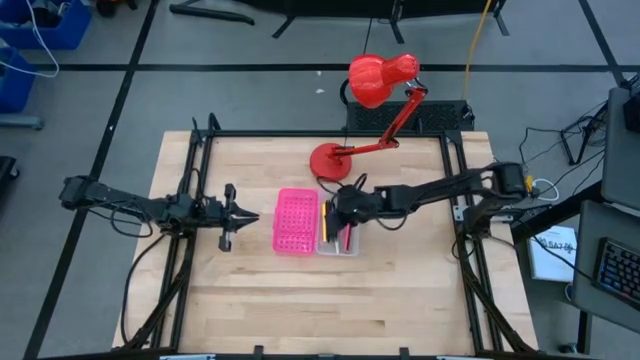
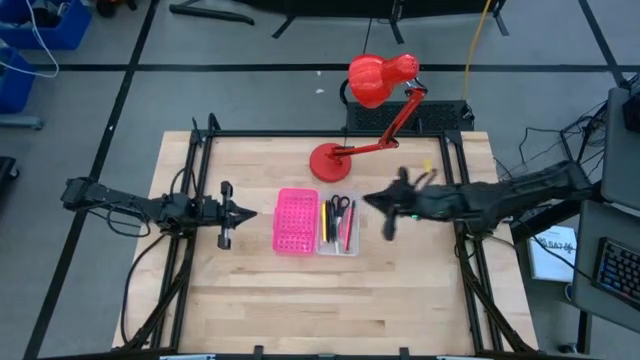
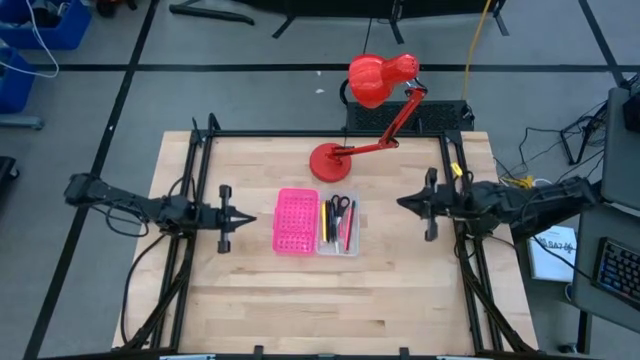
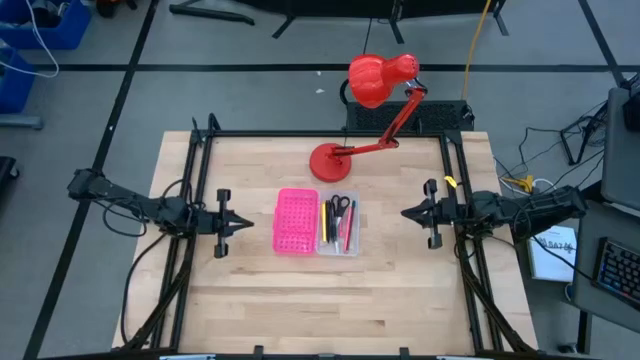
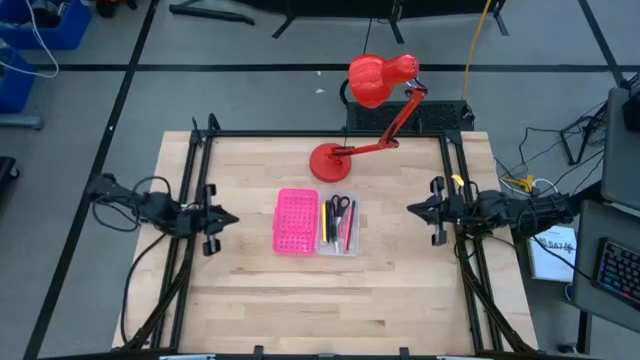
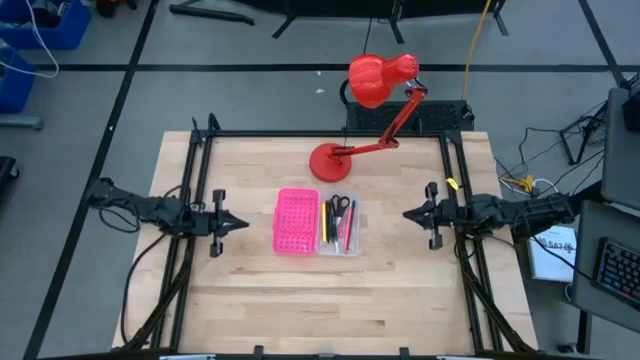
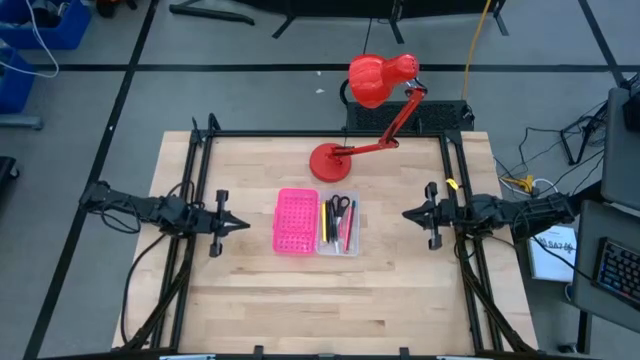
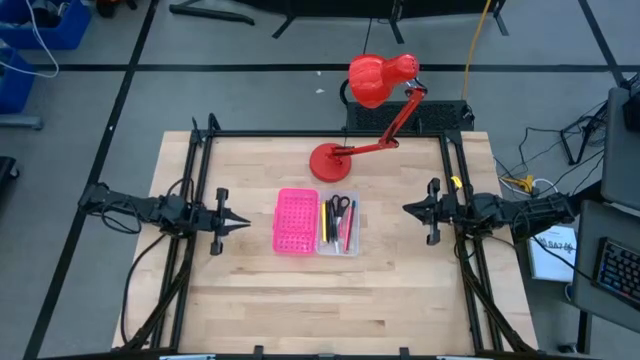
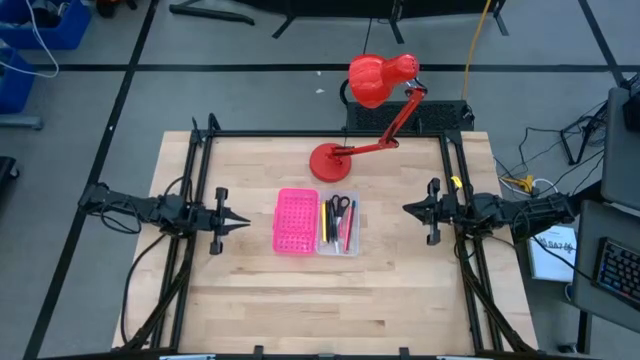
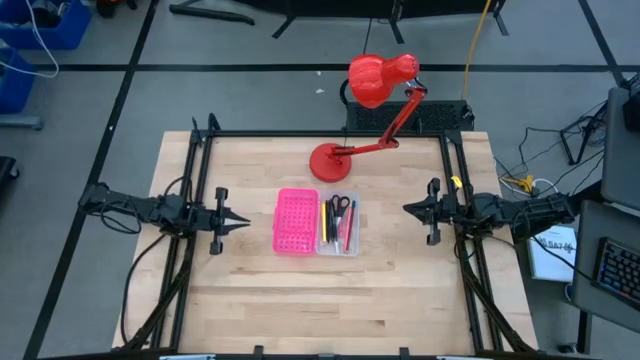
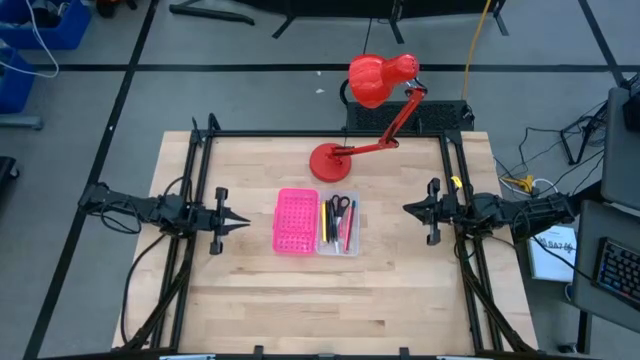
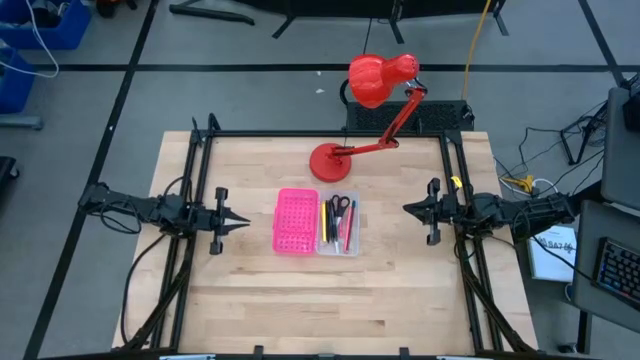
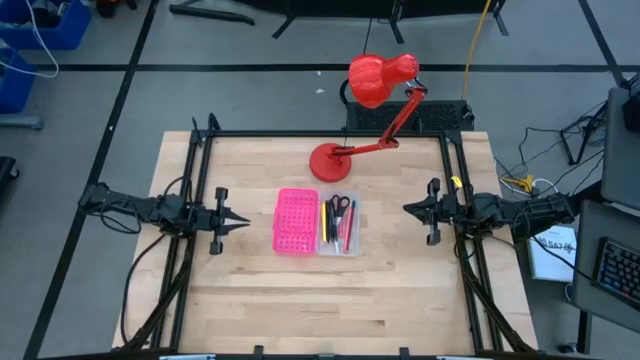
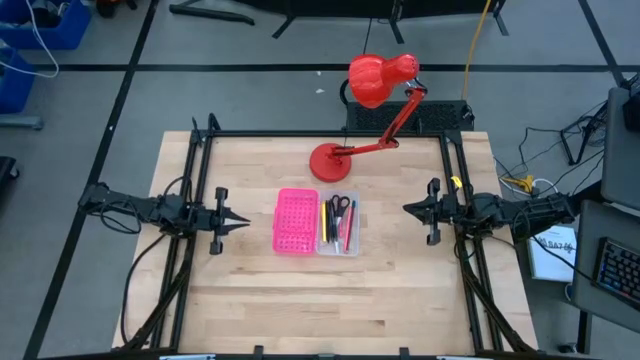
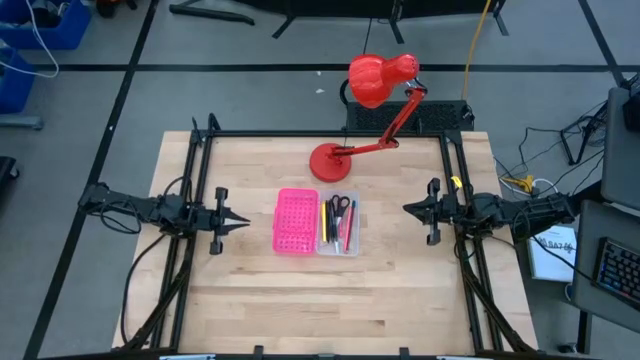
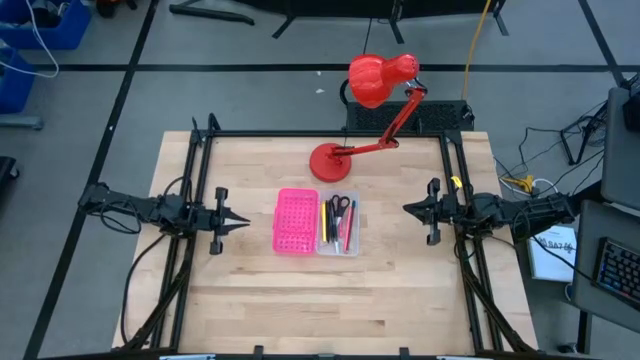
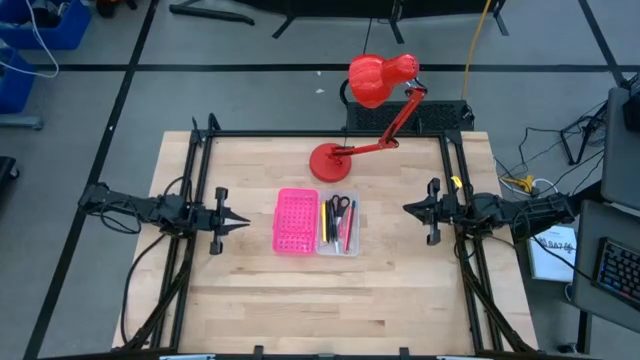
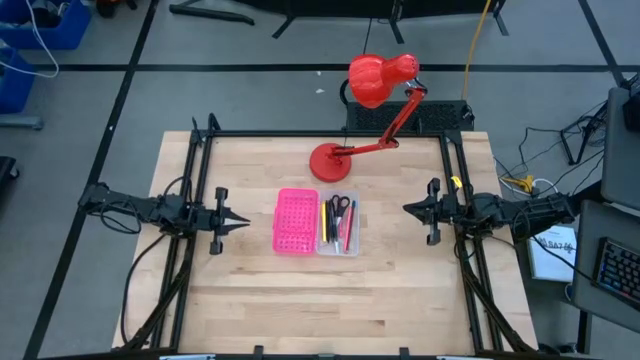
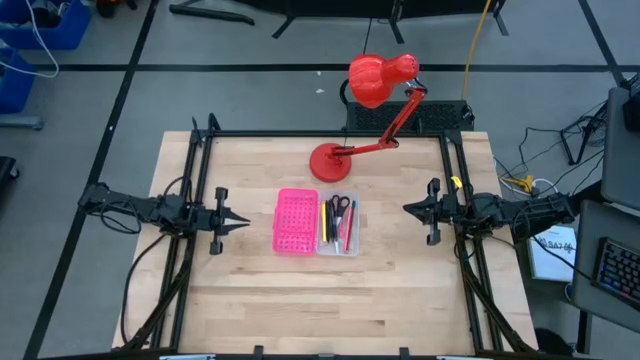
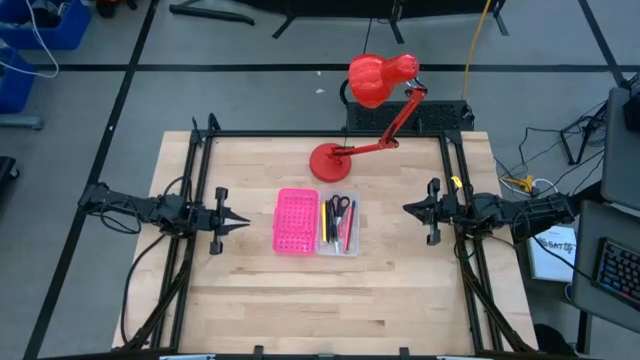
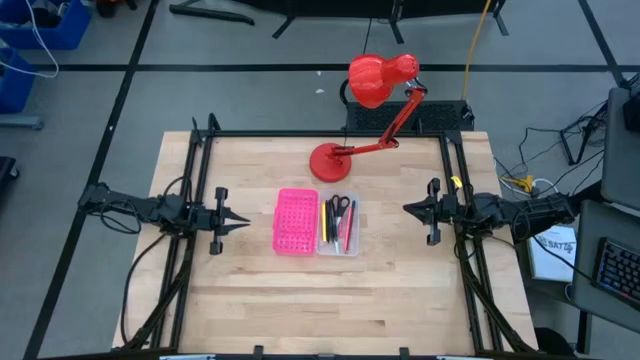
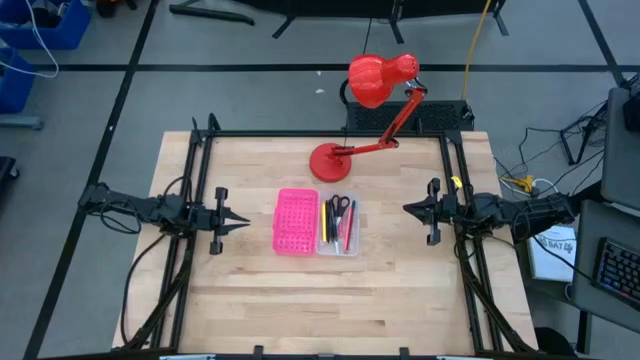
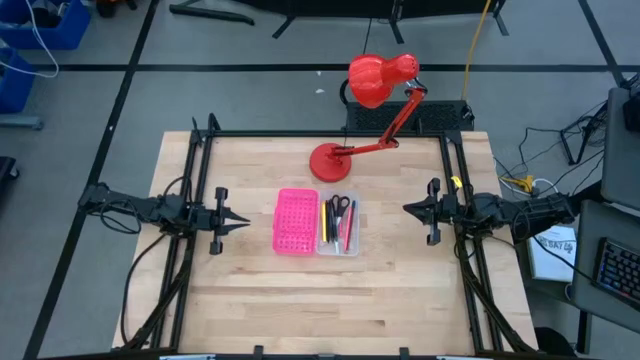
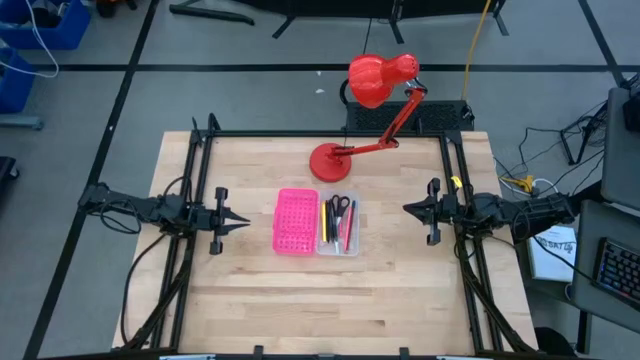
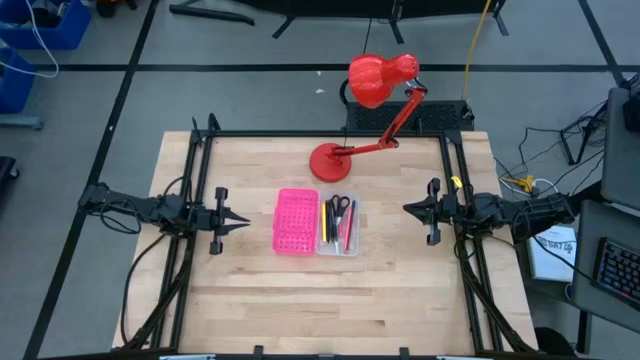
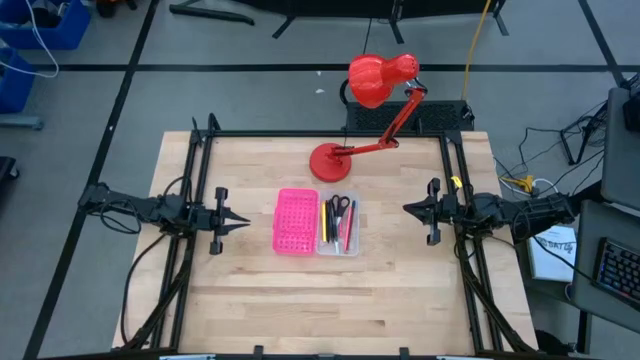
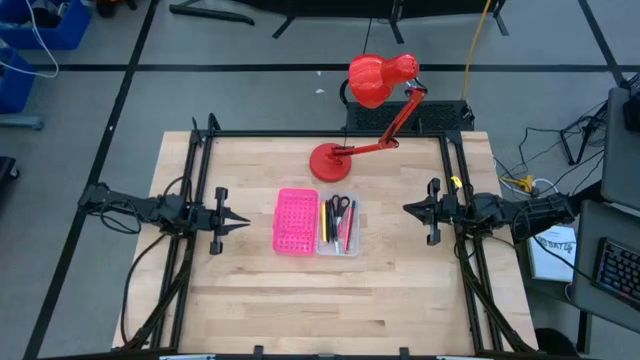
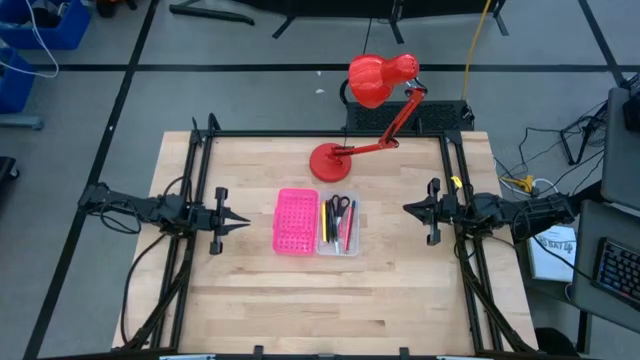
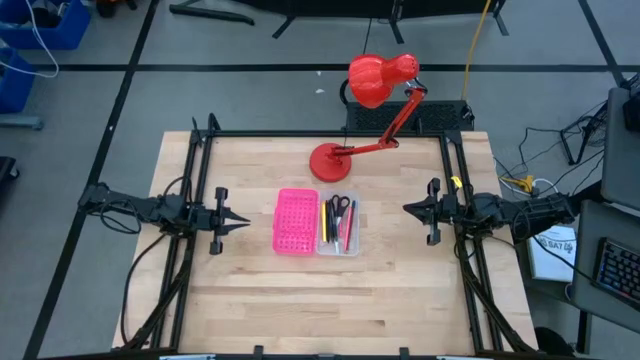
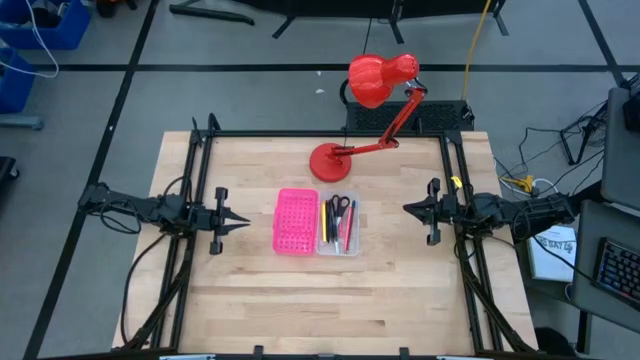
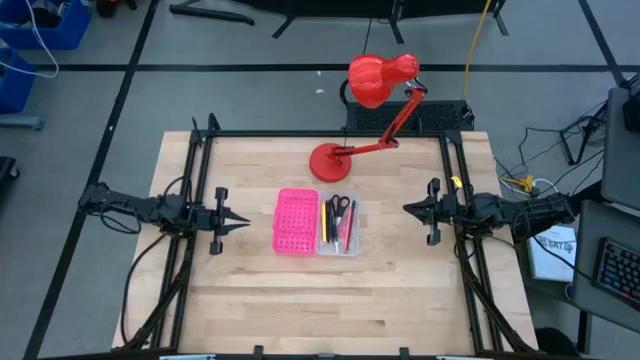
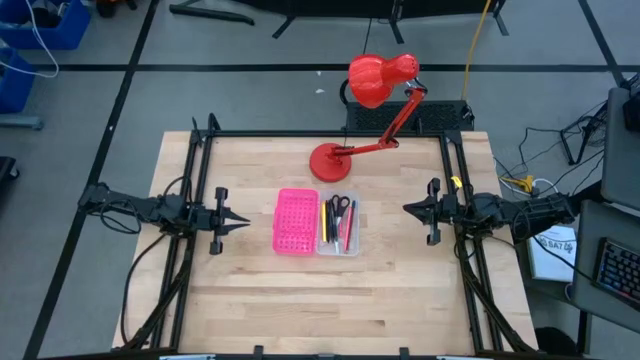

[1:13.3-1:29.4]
Task: Pick & place school supplies into a supply box
Return to Home Position

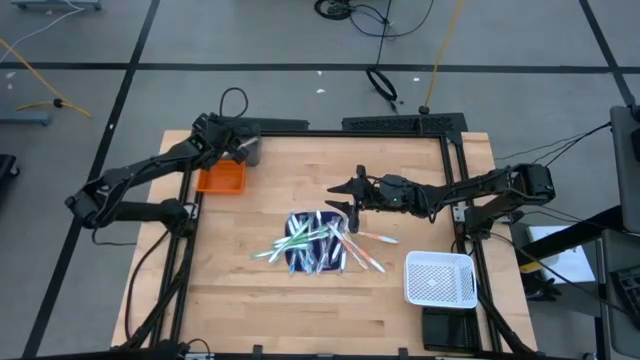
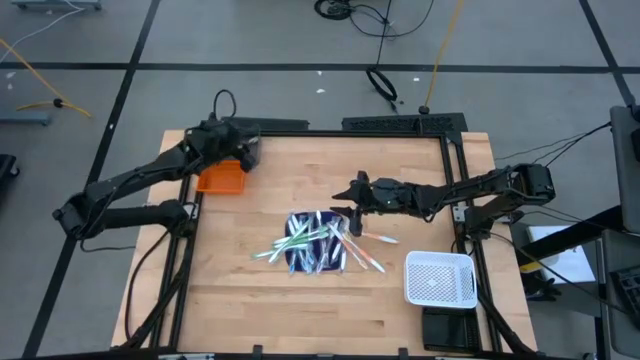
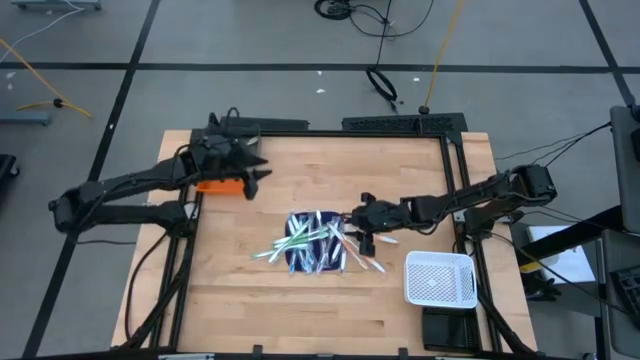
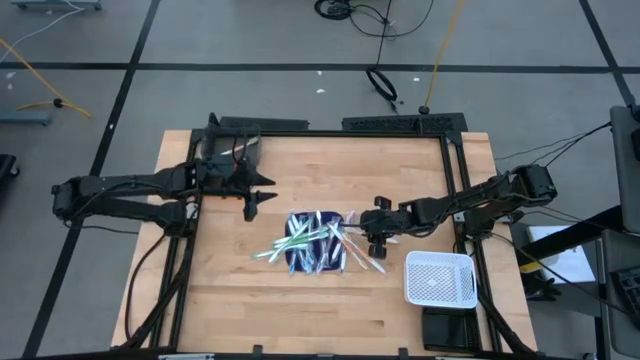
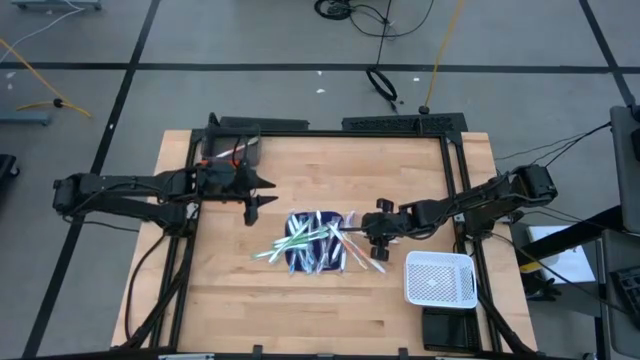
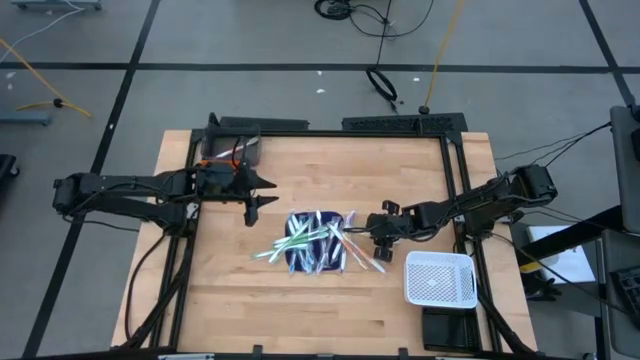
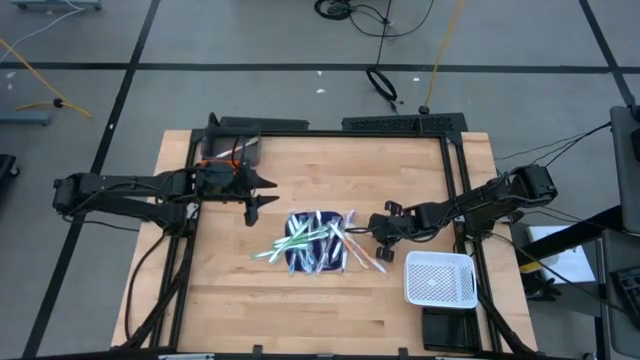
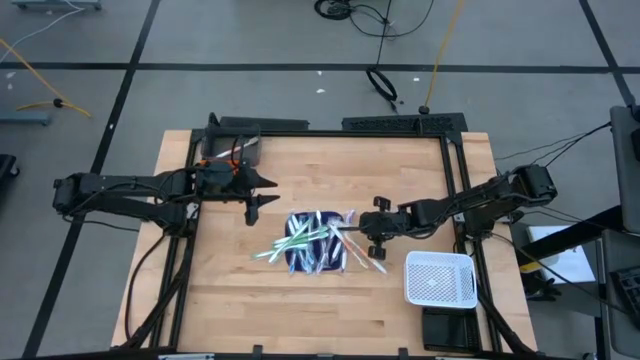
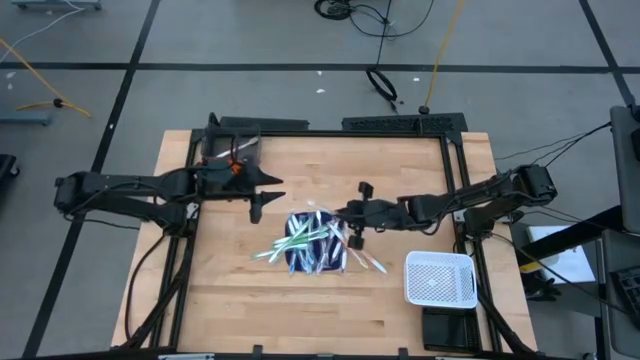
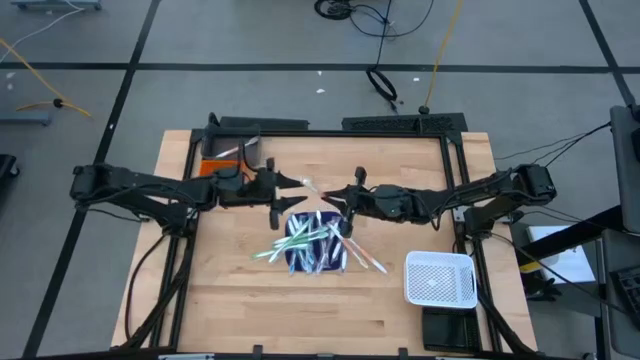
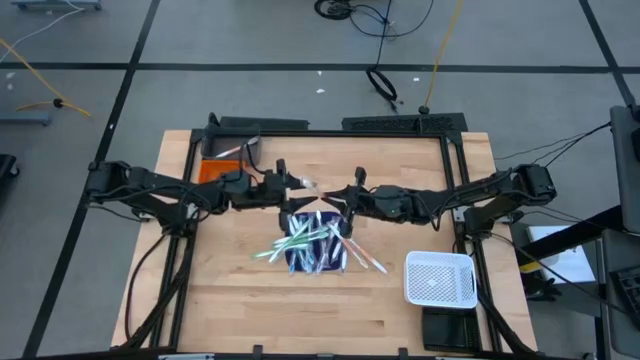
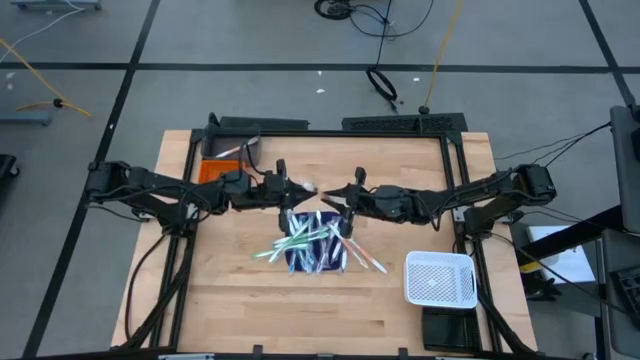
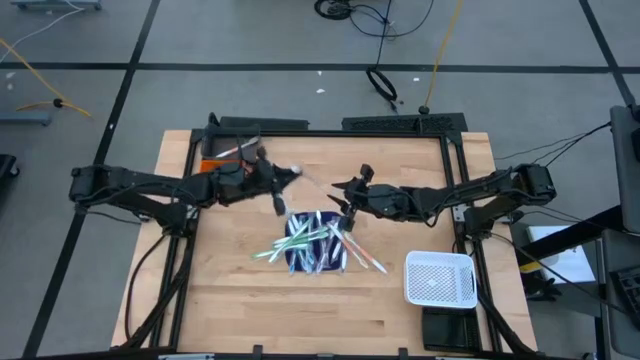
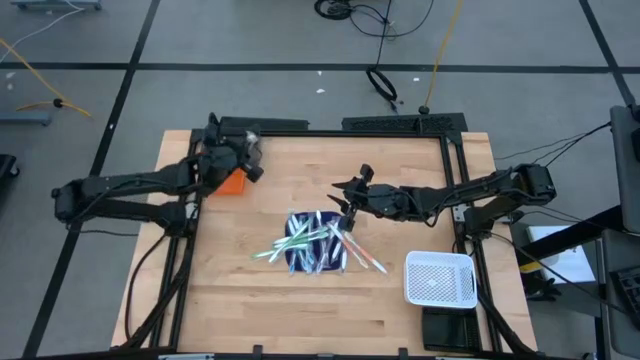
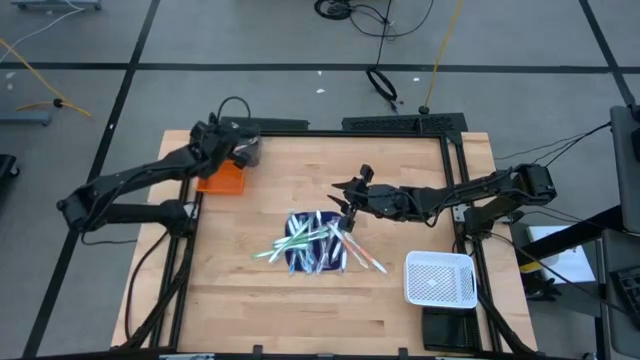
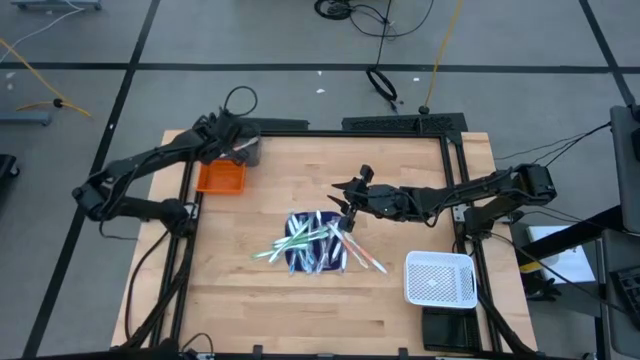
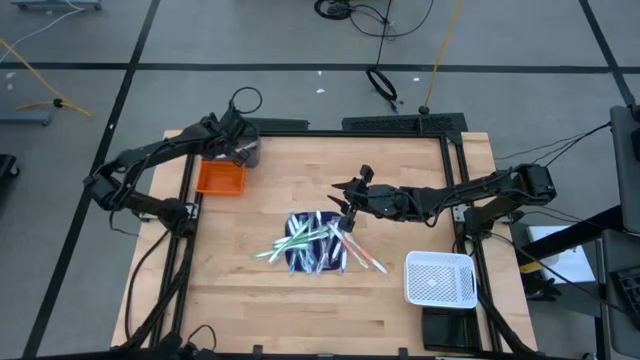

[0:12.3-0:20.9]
Task: Pick & Place Toothbrushes
Put the orange toothbrush into the transparent black bin
